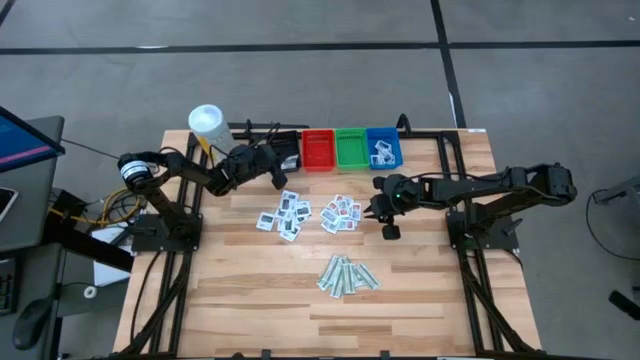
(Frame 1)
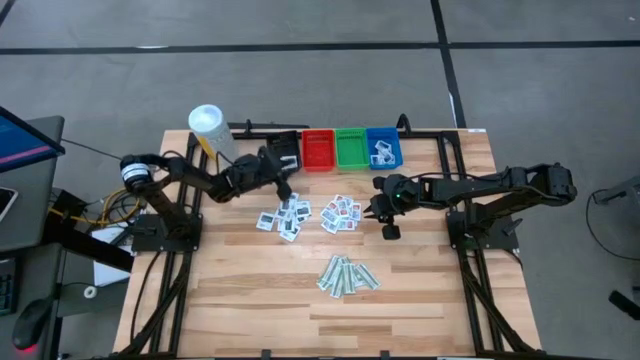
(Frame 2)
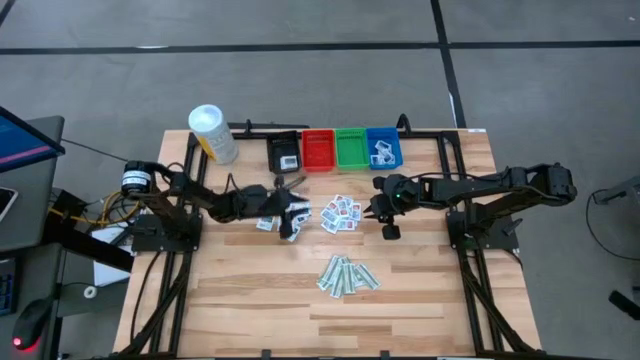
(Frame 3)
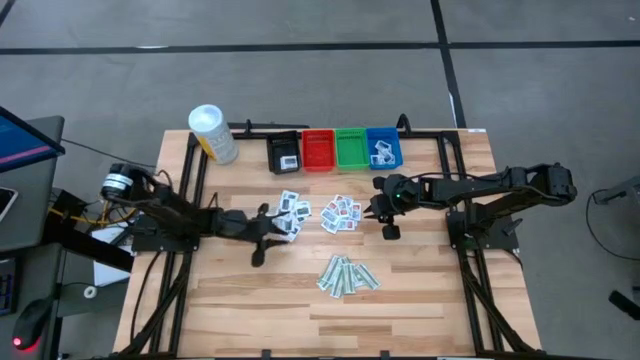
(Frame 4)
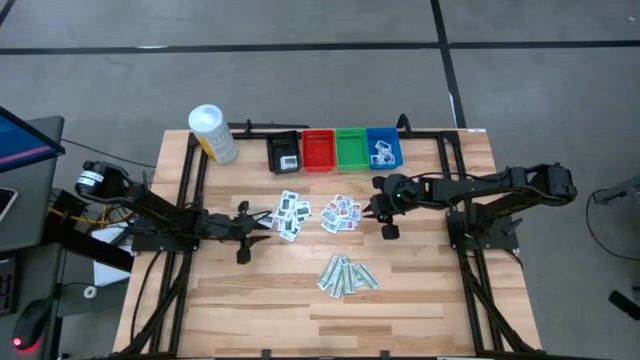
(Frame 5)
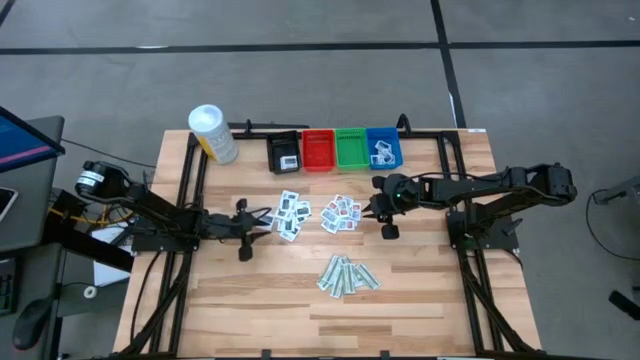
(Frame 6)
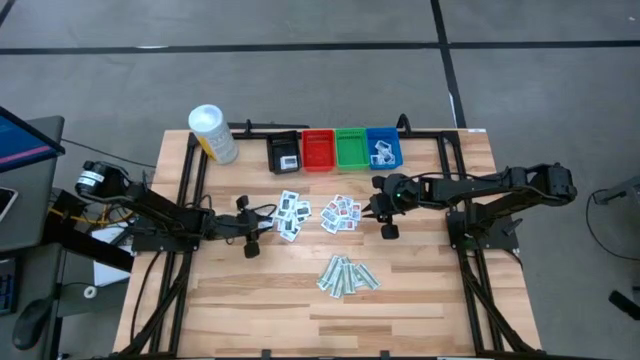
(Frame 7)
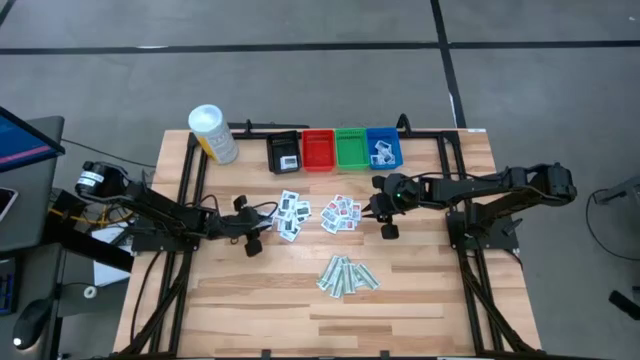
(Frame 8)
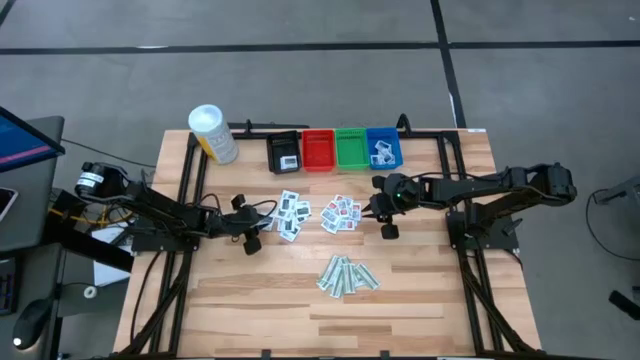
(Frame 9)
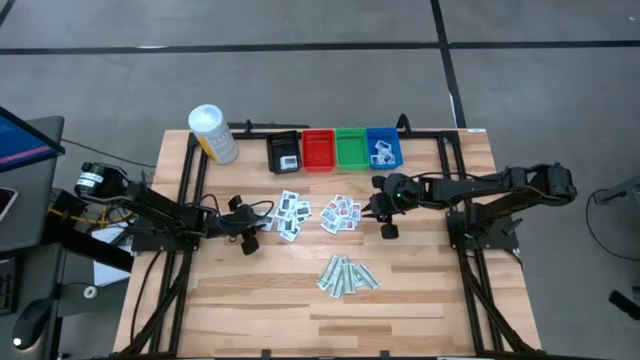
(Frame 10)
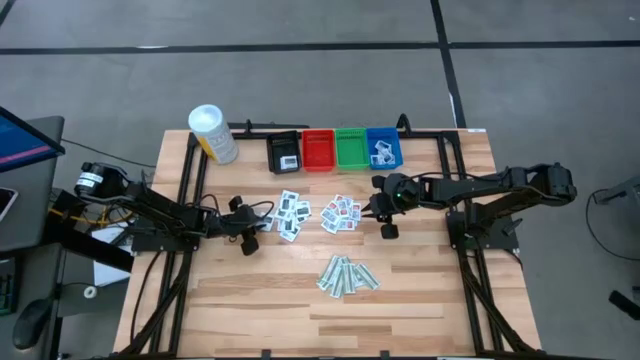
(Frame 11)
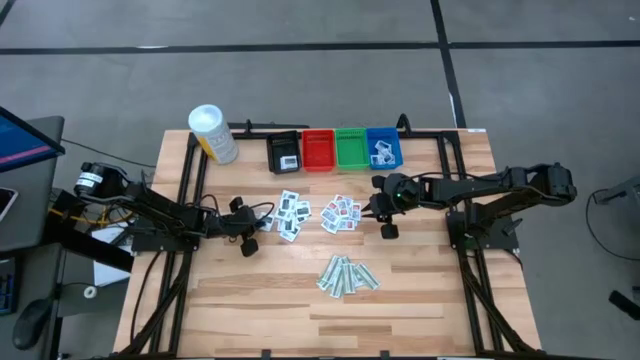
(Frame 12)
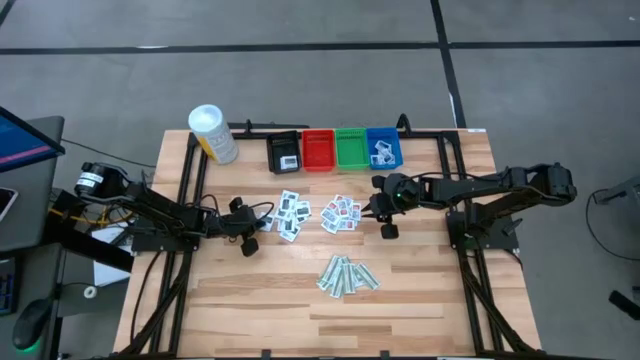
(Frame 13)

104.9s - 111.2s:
Task: Pick & Place First Aid Supplies
Put the black towelette pack into the black bin

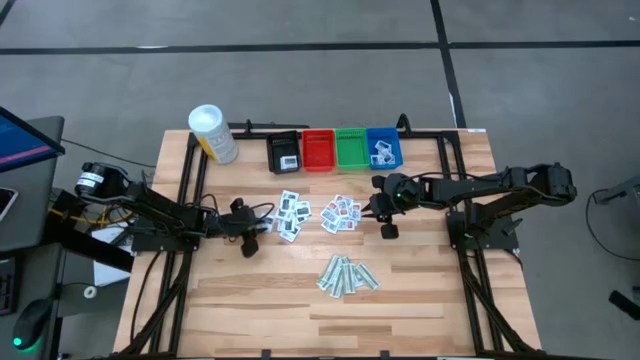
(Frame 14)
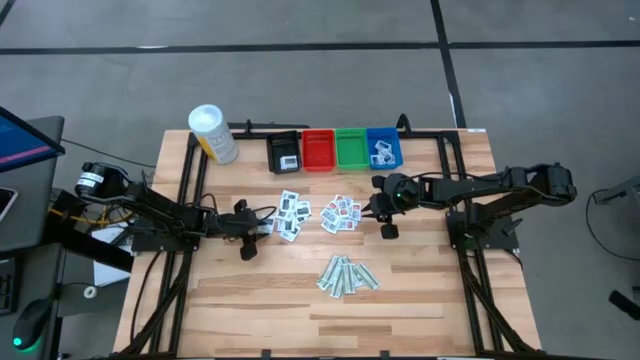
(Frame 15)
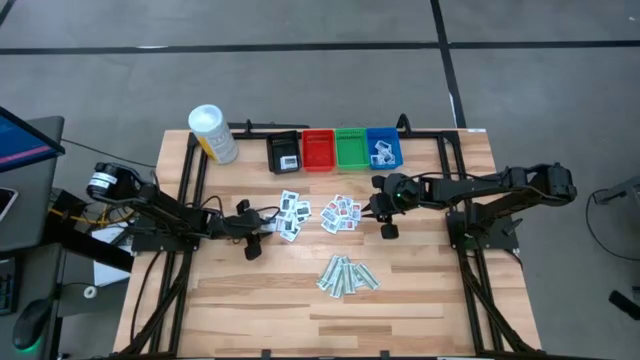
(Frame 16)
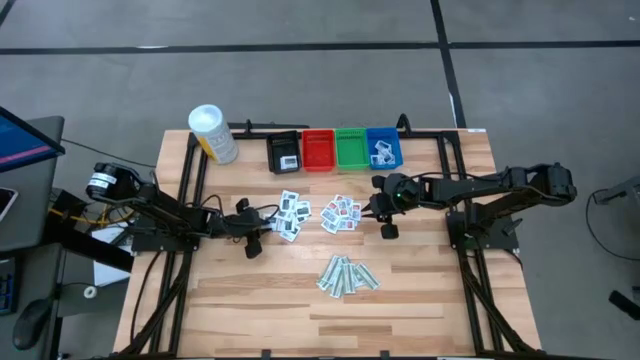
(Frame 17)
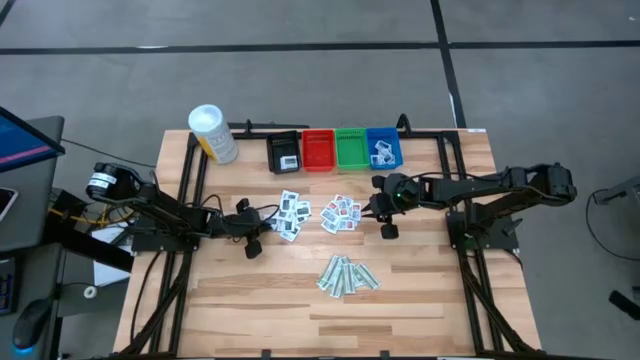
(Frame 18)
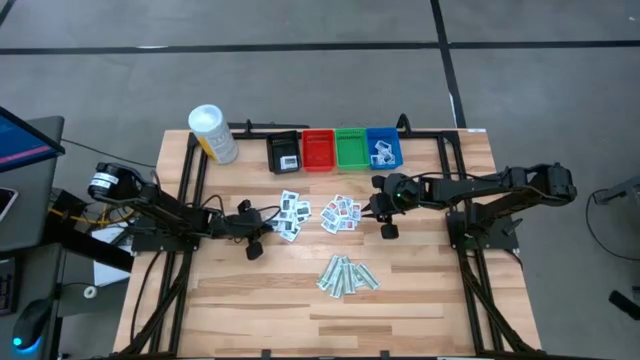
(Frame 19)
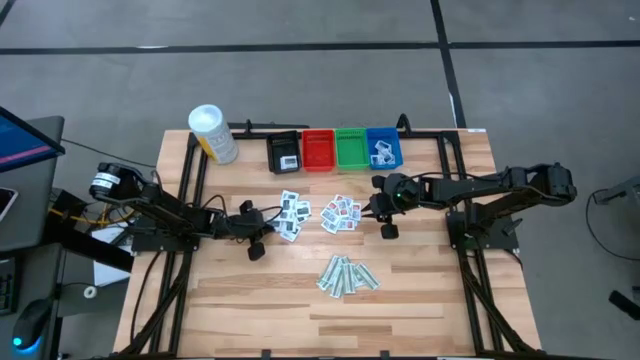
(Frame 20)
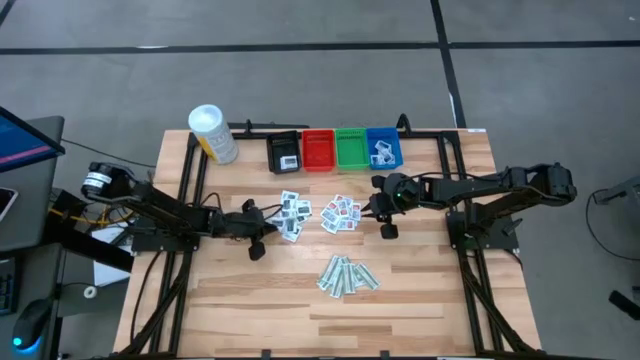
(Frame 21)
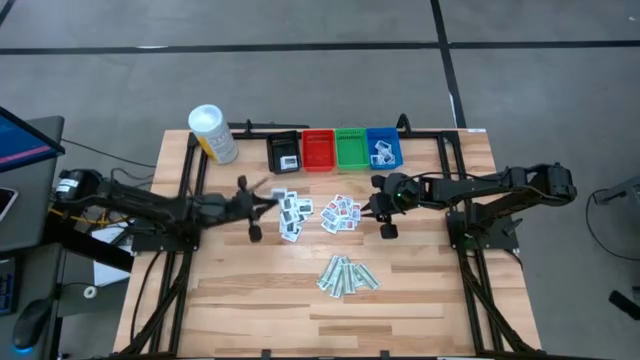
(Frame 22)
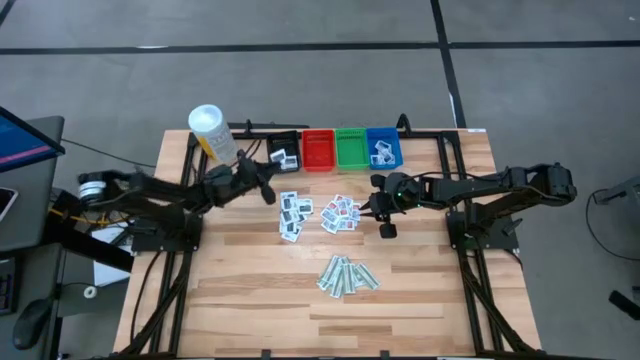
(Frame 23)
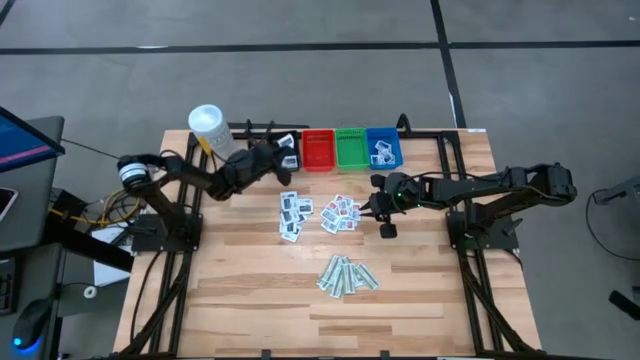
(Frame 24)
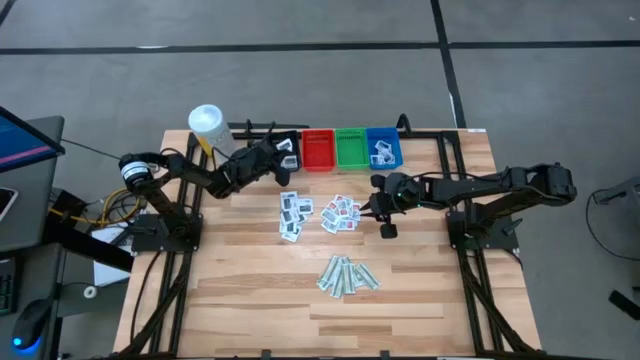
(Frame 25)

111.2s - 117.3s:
Put the black towelette pack into the black bin

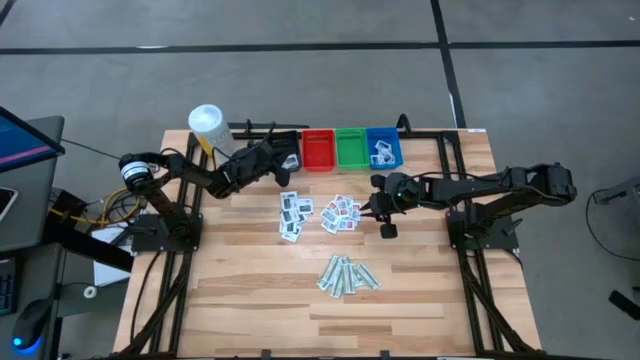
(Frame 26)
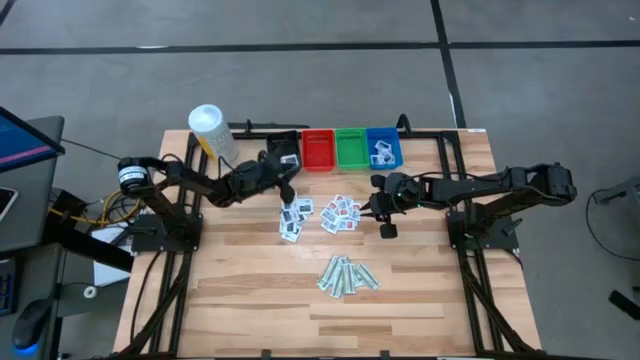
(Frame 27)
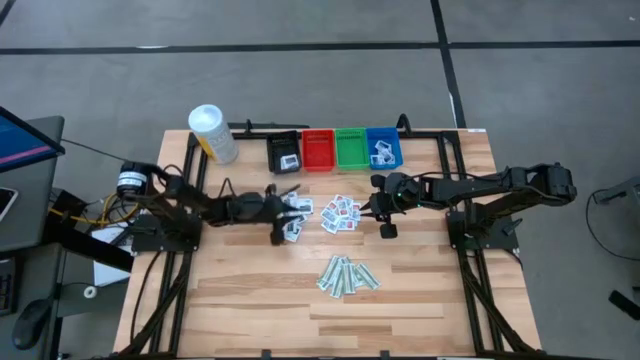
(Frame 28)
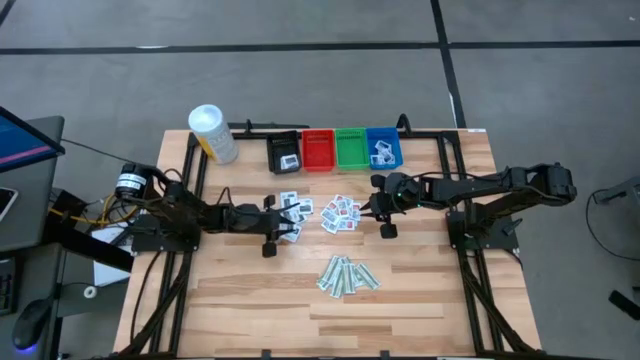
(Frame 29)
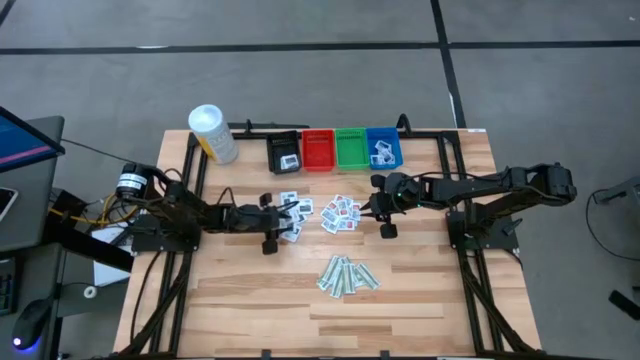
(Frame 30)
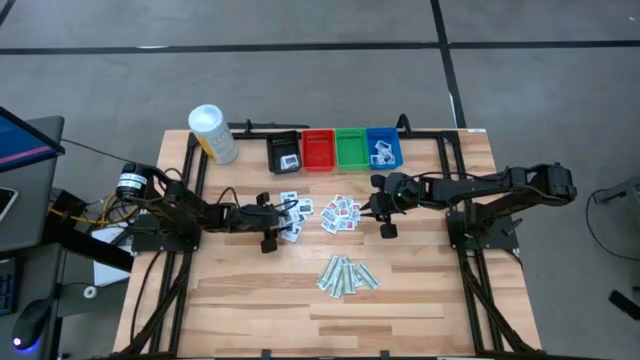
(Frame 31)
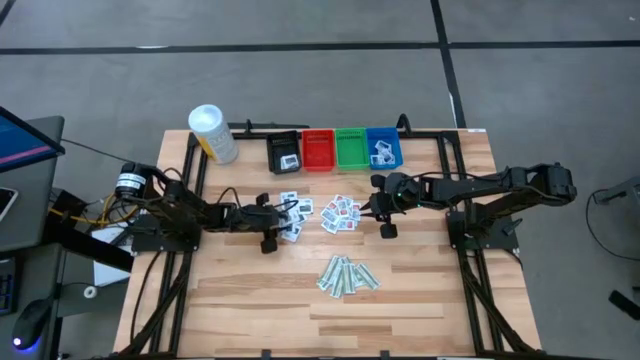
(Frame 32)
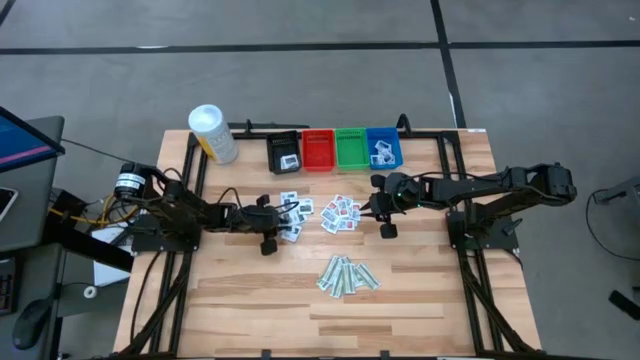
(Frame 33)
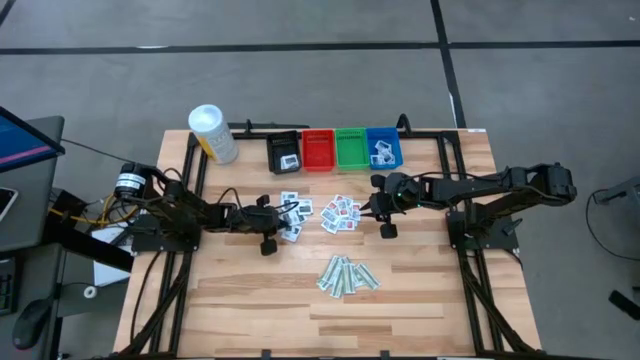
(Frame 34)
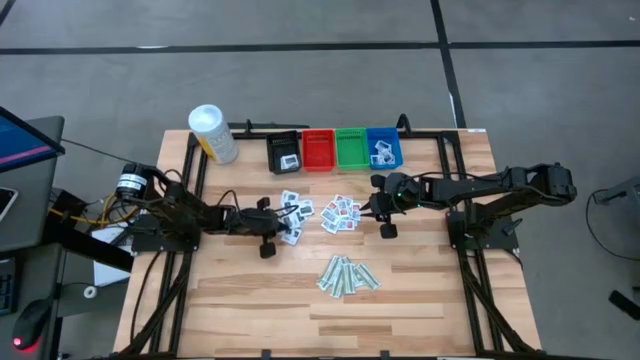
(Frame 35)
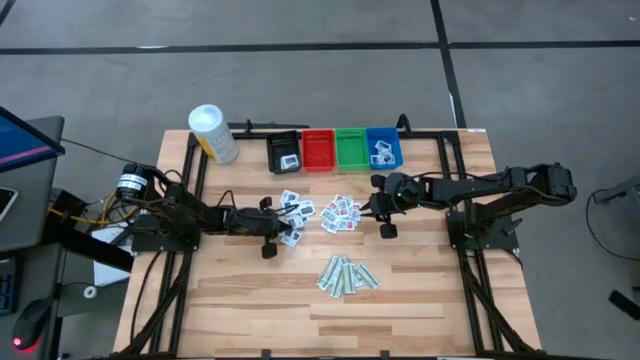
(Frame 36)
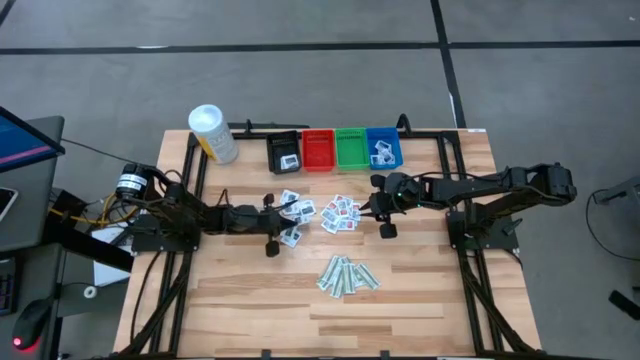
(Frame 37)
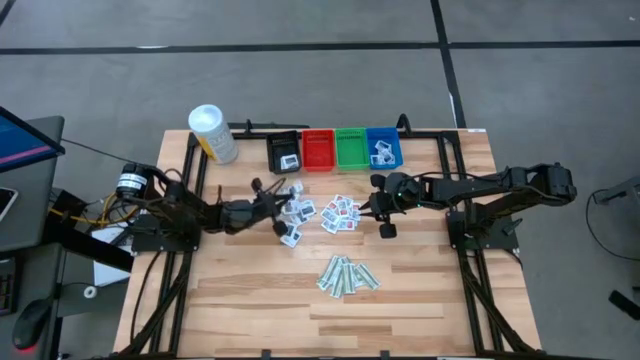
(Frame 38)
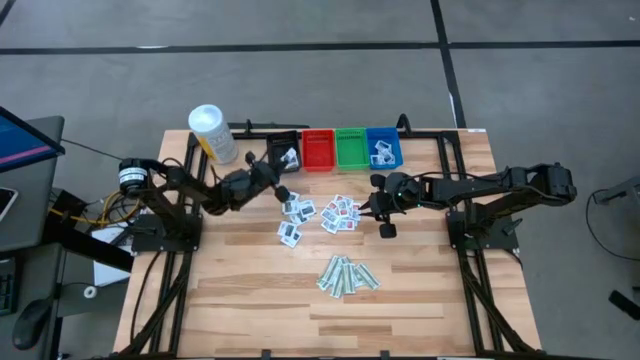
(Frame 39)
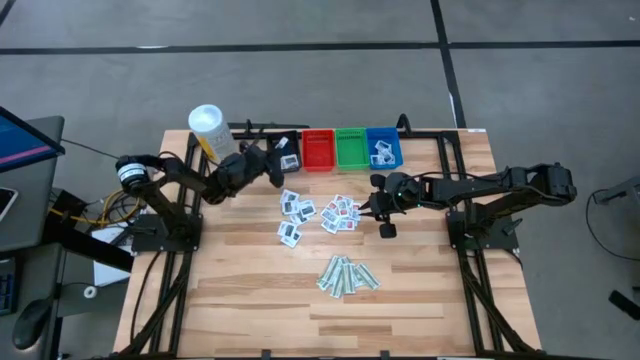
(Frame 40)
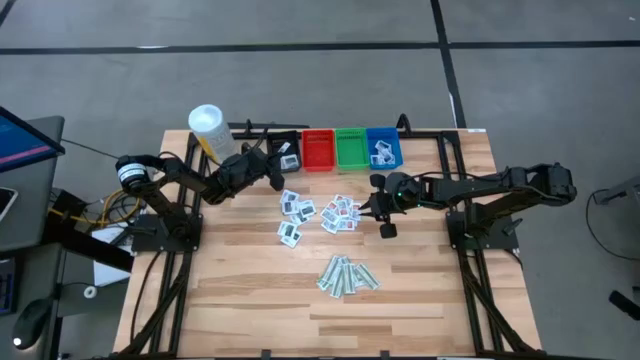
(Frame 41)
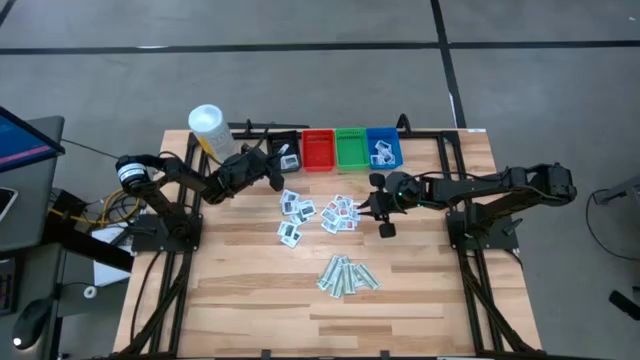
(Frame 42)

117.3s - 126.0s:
Put the black towelette pack into the black bin

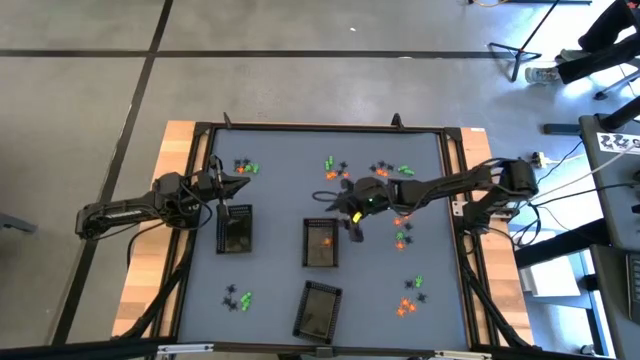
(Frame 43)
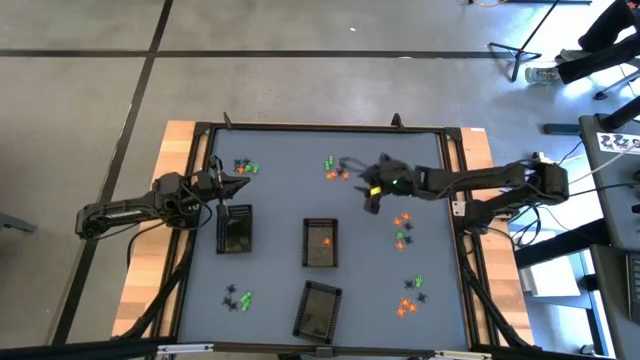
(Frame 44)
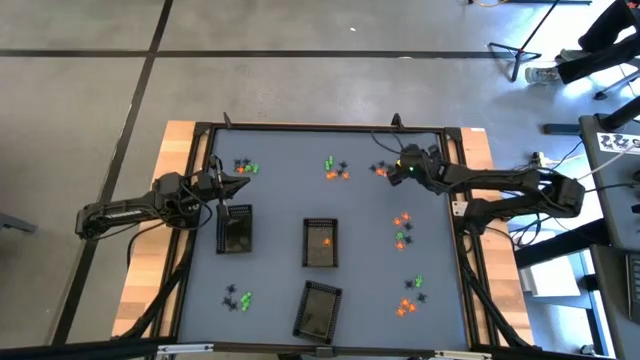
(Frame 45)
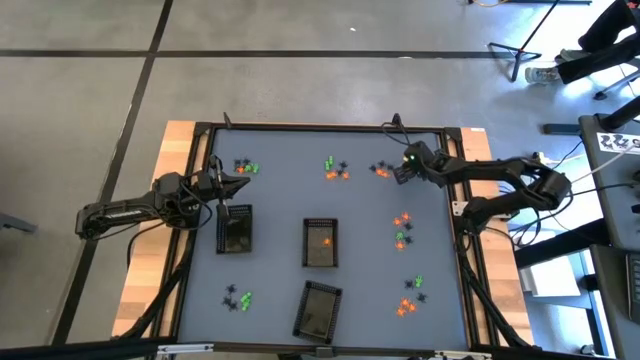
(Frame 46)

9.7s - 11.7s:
Task: Sort Halloween decoration
Put the green toy skeleton into the bottom black basket
